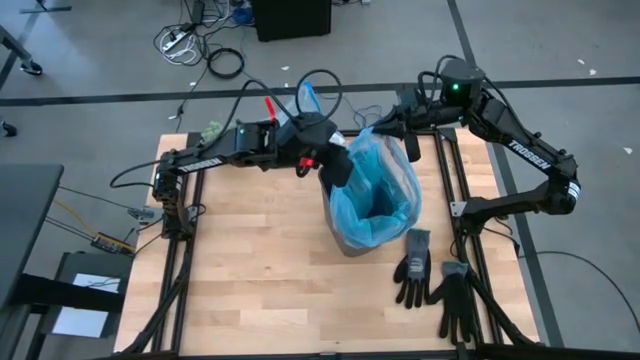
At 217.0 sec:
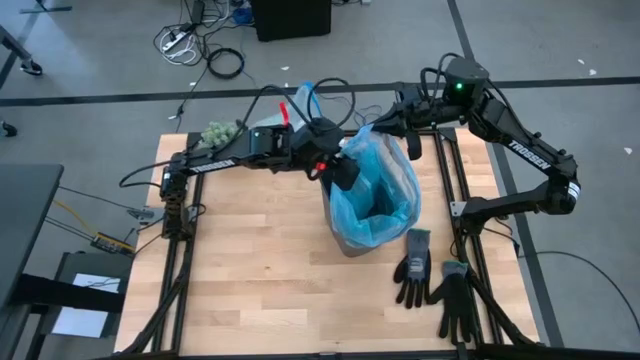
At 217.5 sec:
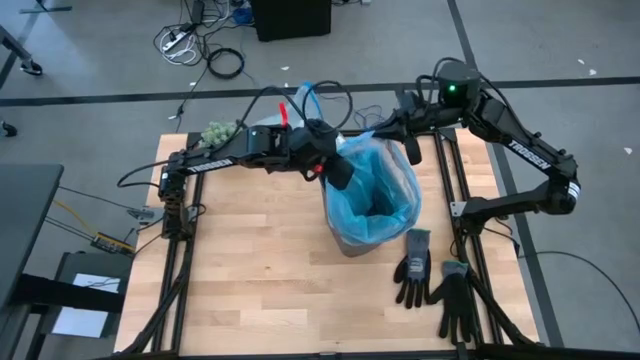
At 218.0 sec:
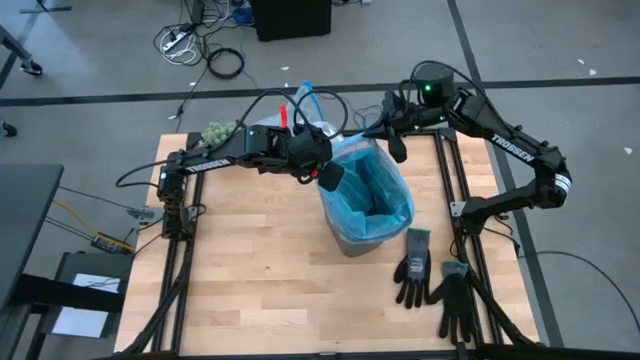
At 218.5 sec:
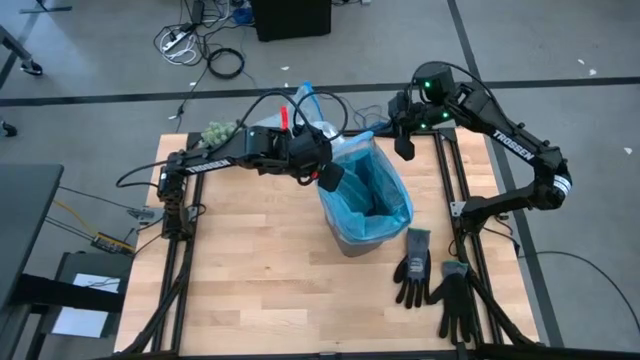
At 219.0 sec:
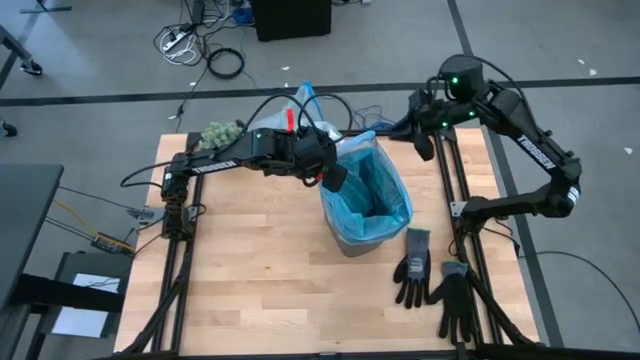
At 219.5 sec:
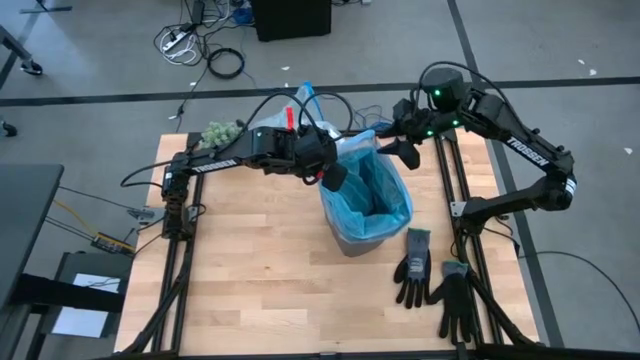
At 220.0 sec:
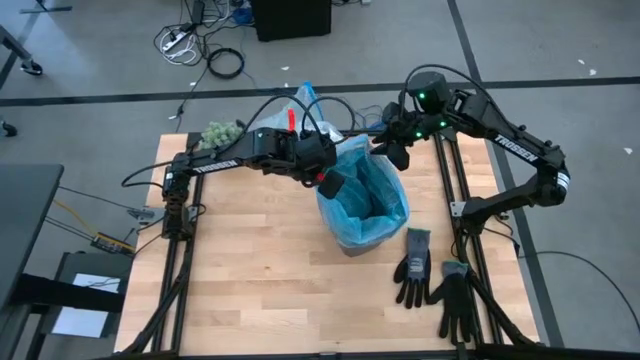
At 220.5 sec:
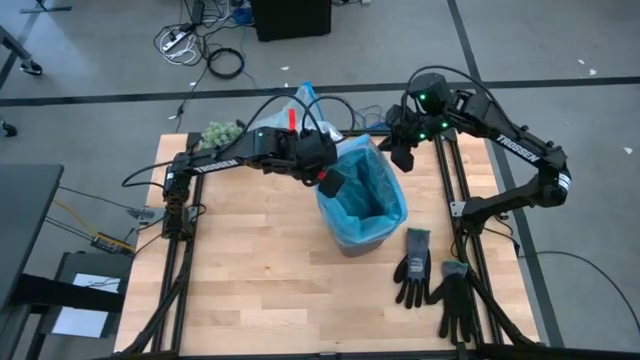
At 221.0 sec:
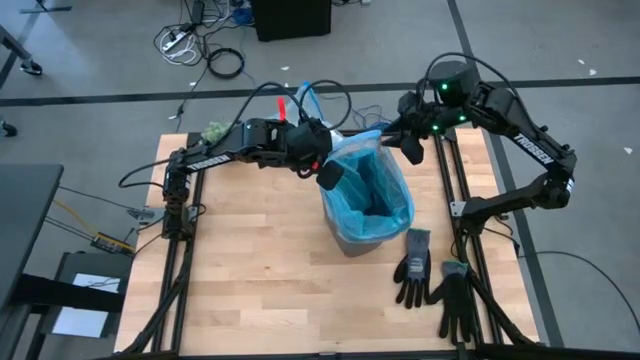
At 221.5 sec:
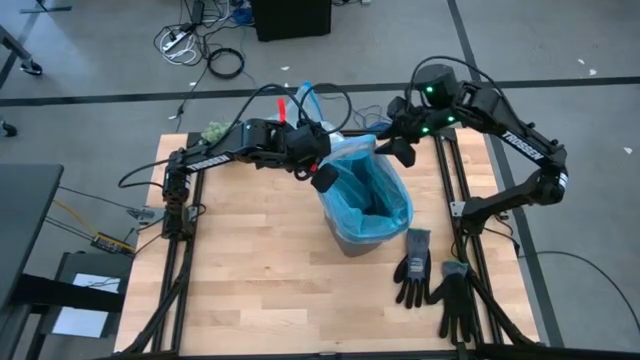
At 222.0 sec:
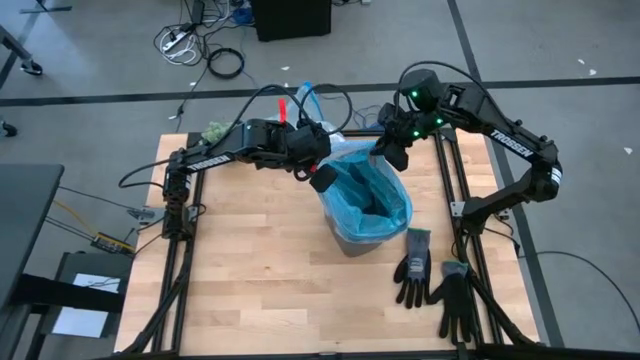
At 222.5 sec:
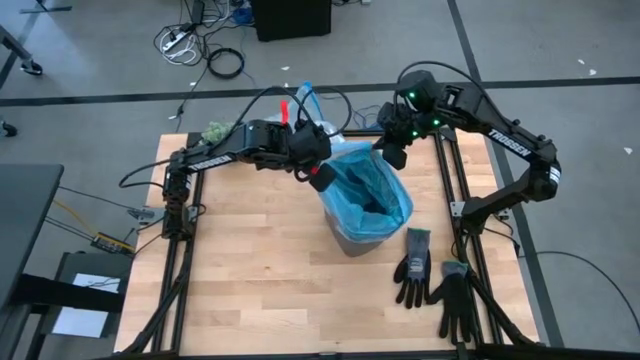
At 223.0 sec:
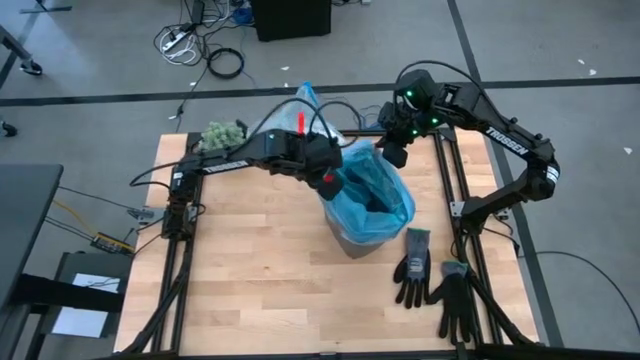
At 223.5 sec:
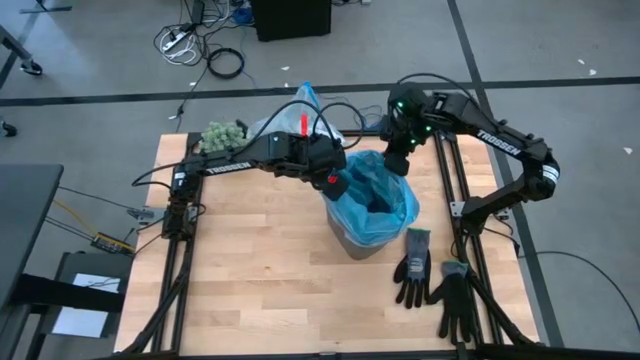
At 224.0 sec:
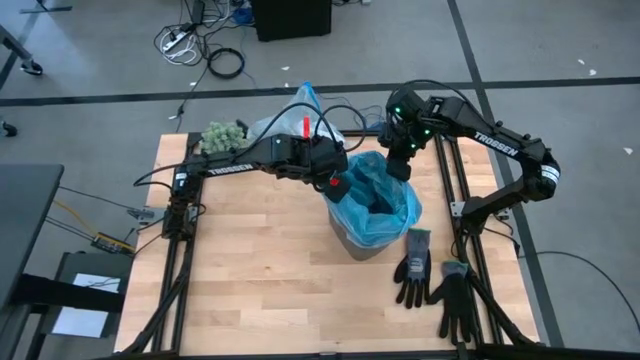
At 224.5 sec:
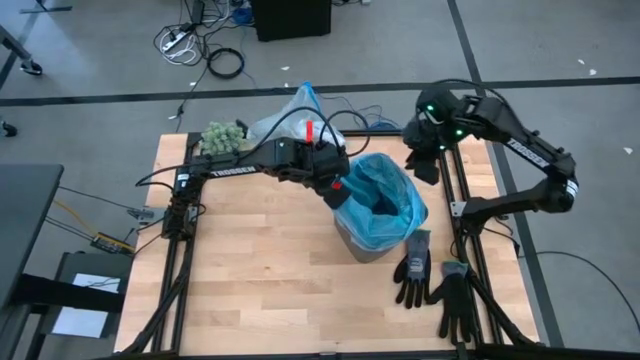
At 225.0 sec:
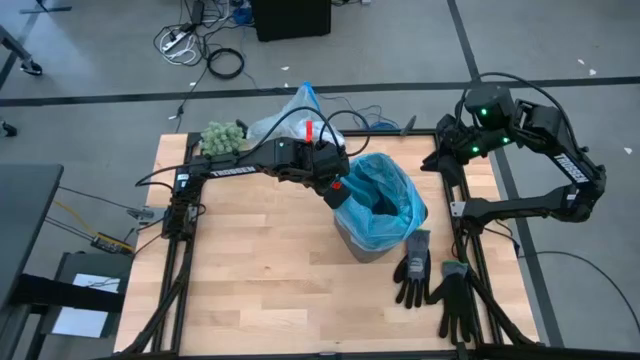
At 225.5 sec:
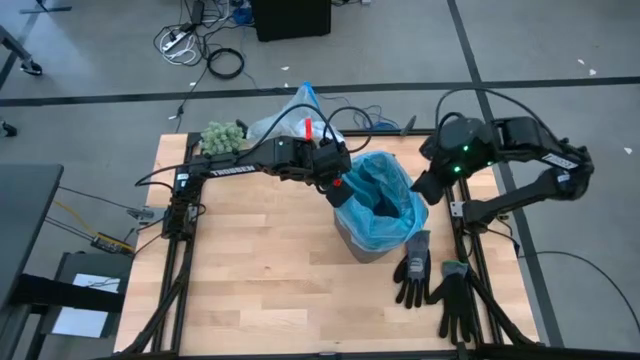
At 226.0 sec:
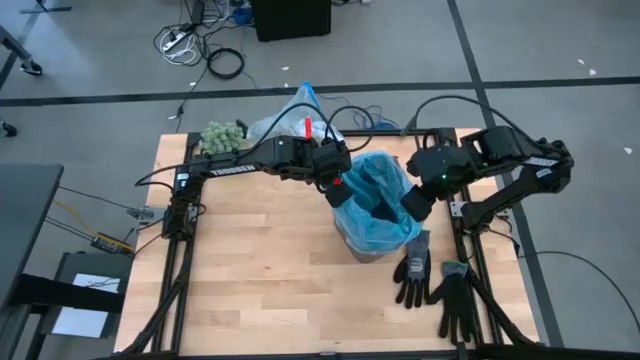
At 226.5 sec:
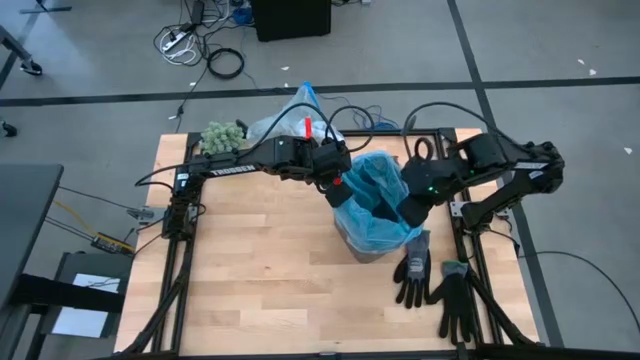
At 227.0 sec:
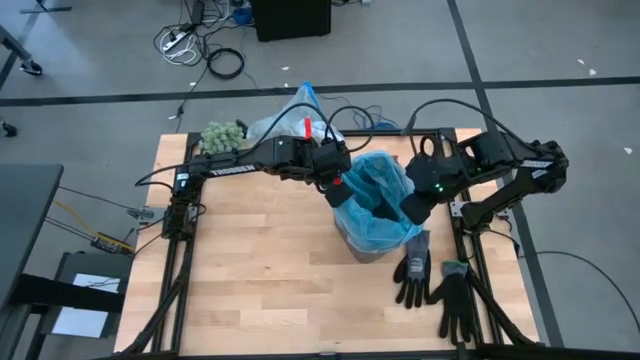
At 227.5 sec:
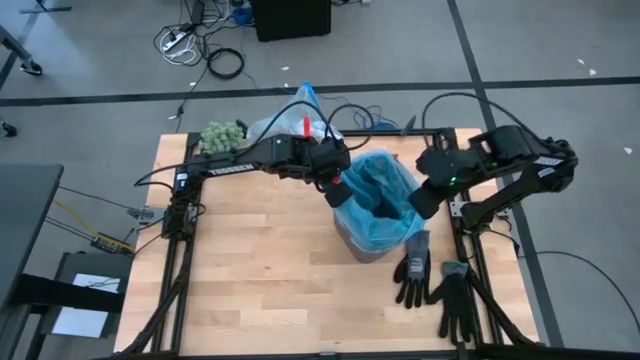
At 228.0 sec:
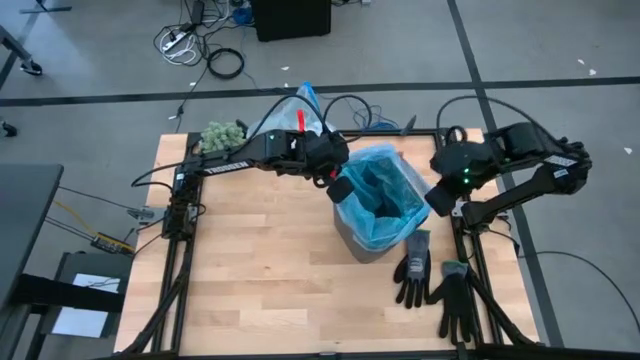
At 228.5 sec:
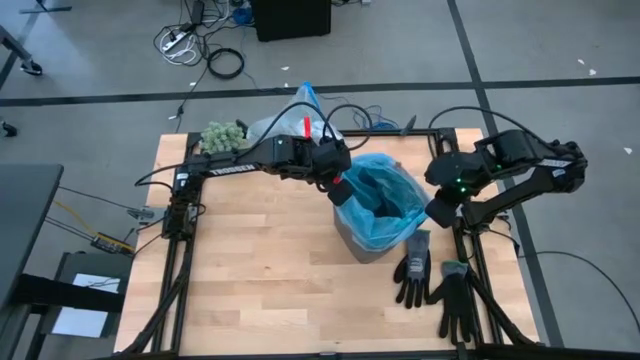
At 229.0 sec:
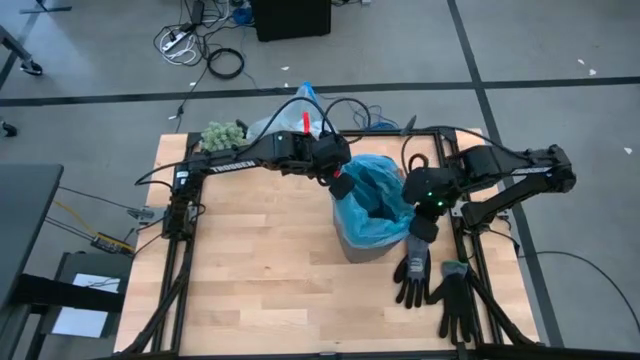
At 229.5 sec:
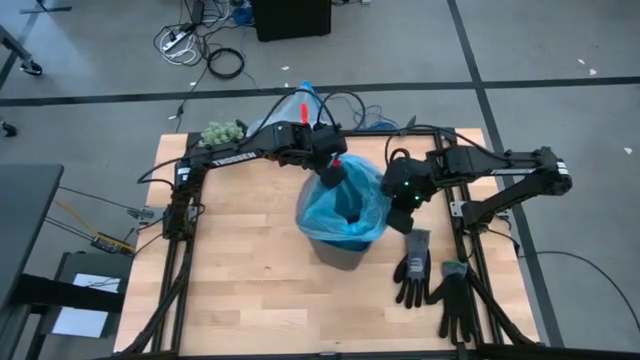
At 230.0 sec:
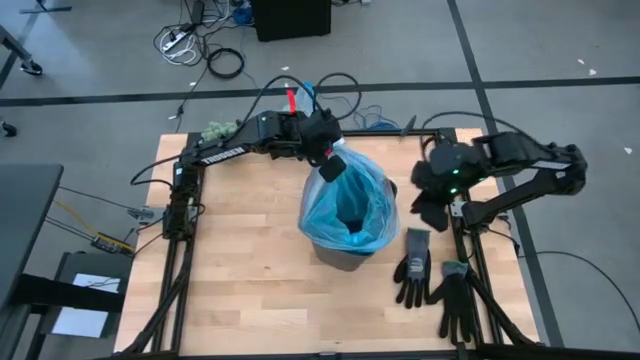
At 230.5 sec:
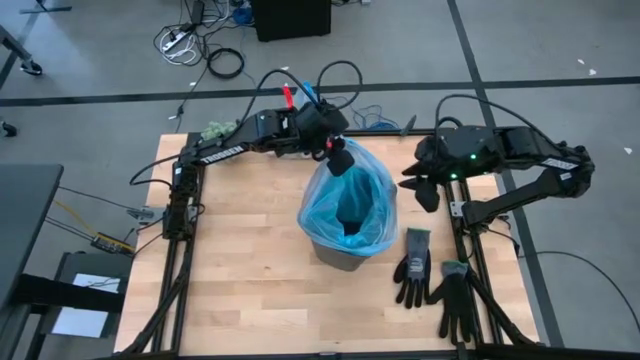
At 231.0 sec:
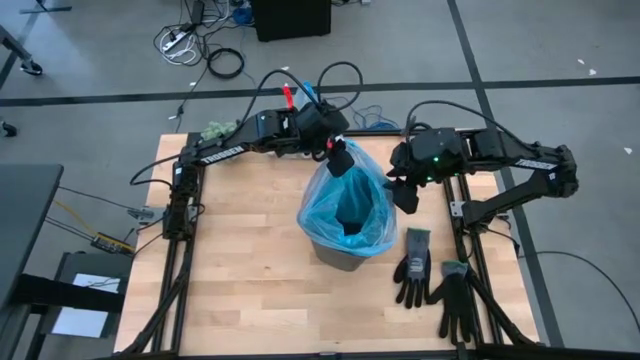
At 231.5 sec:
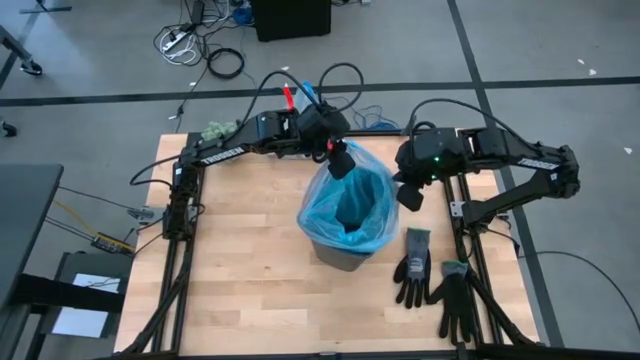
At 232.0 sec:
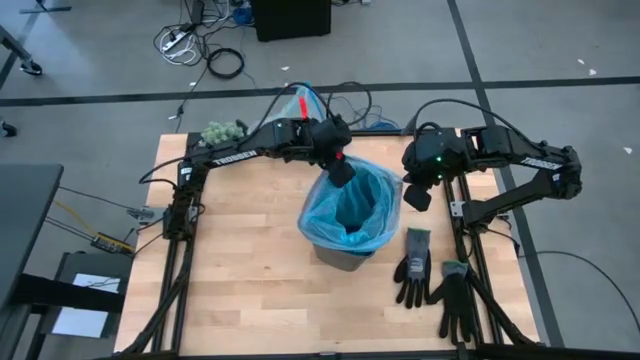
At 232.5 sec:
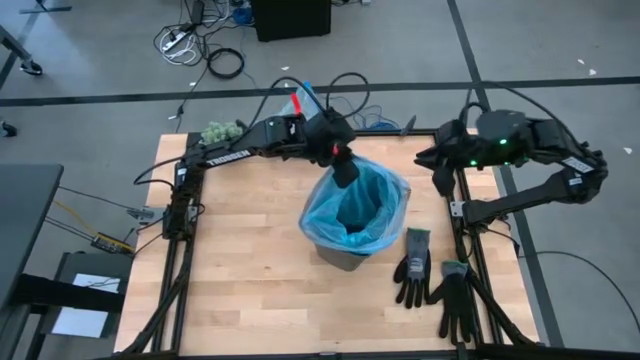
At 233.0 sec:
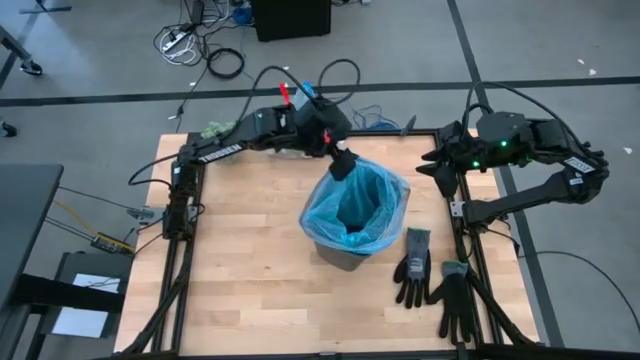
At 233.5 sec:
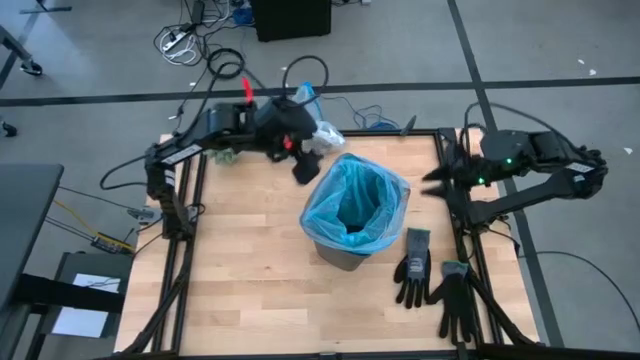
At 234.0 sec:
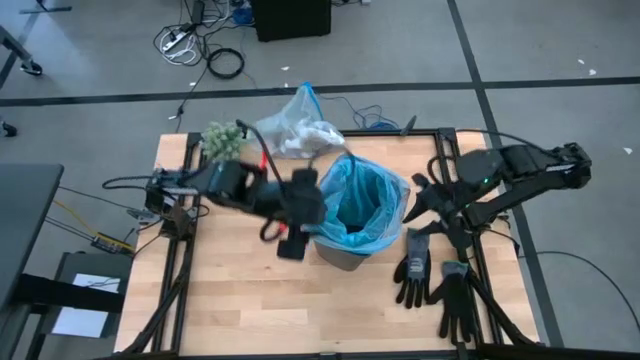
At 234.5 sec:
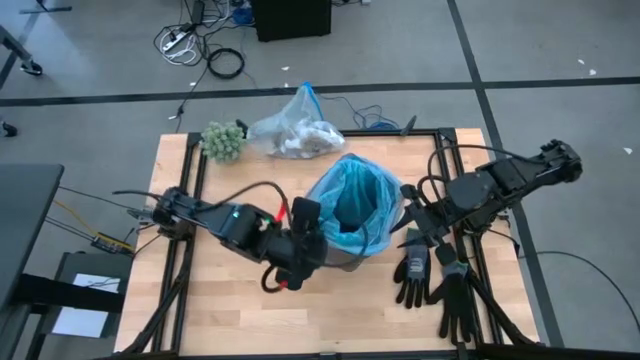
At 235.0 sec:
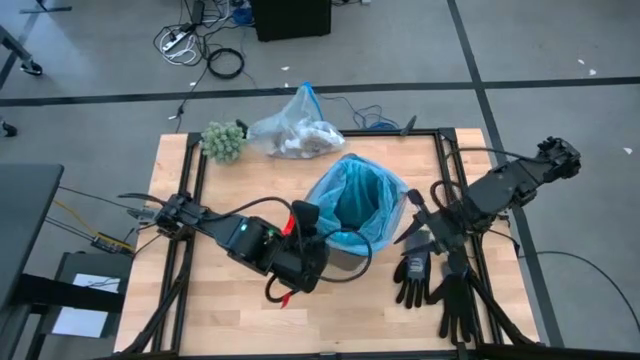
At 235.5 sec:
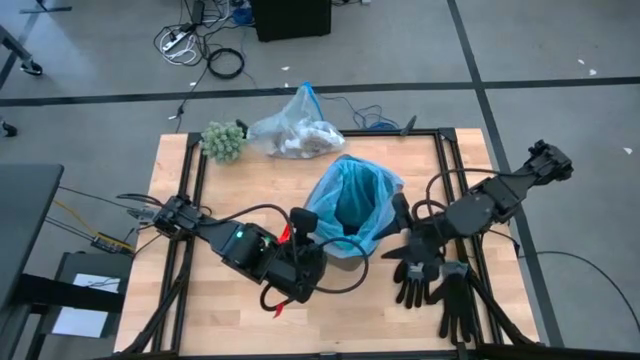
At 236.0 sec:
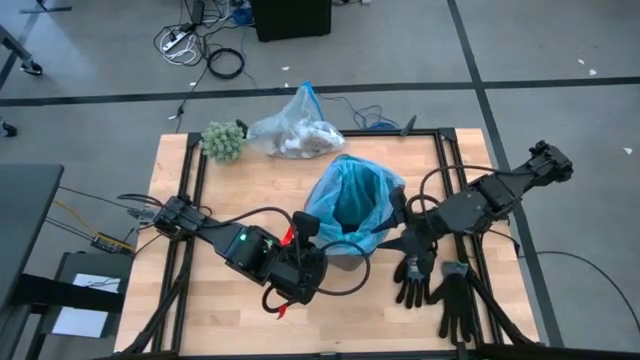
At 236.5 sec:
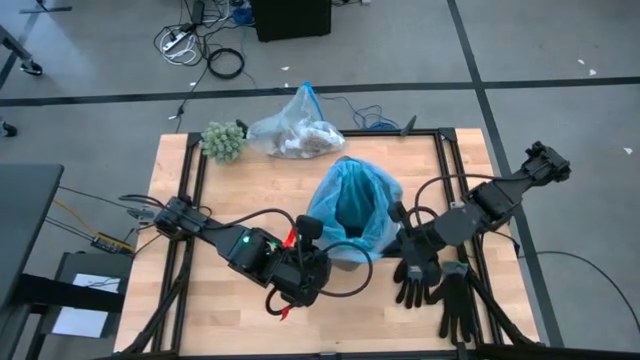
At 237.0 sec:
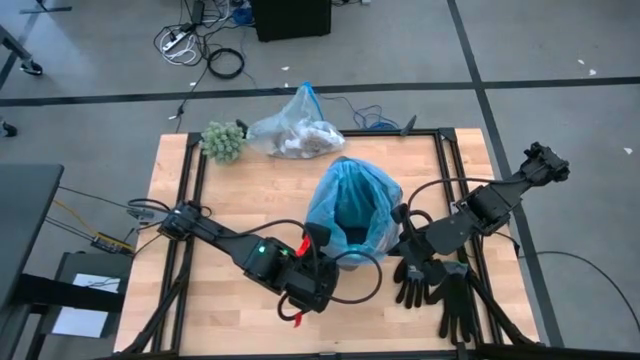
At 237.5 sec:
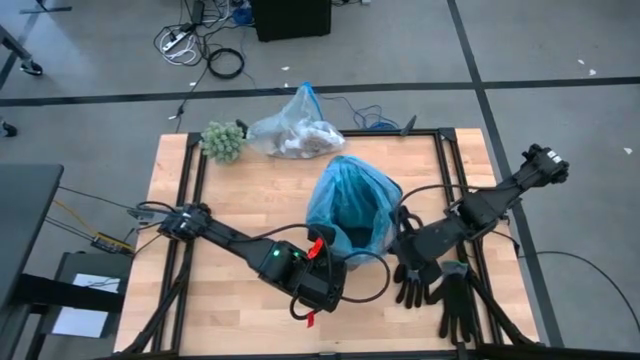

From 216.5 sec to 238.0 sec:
Task: place trash/remove bag and relplace
Insert the new blue trash bag into the trash bin
